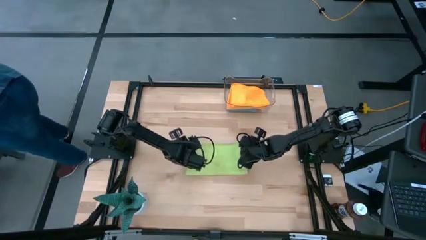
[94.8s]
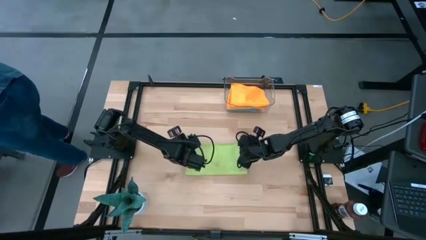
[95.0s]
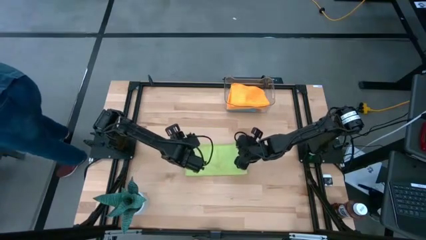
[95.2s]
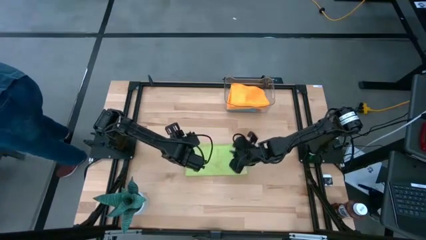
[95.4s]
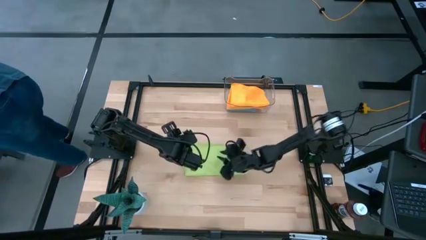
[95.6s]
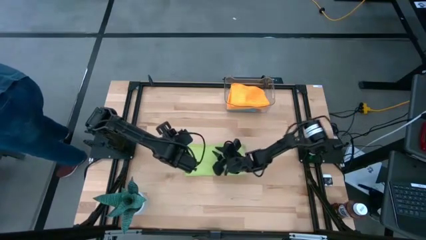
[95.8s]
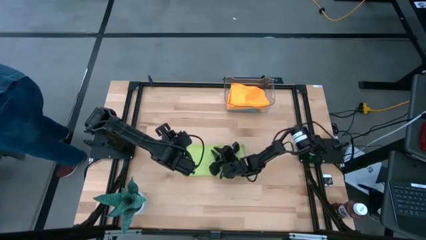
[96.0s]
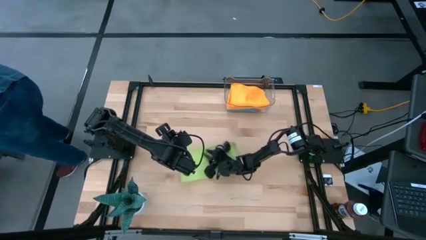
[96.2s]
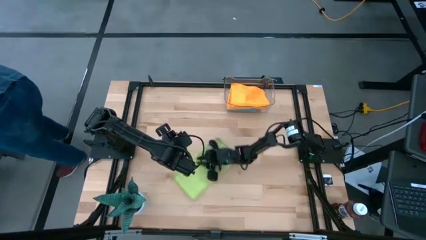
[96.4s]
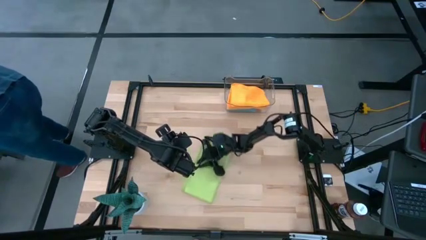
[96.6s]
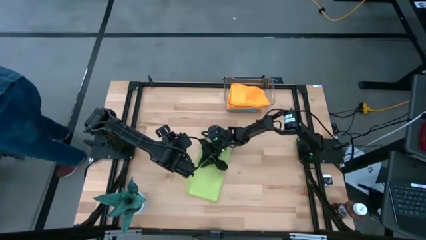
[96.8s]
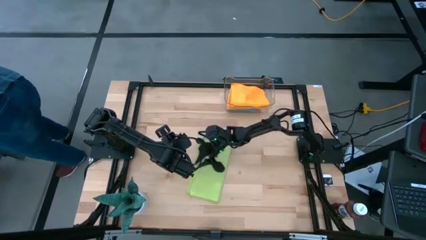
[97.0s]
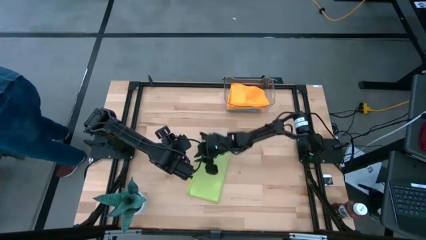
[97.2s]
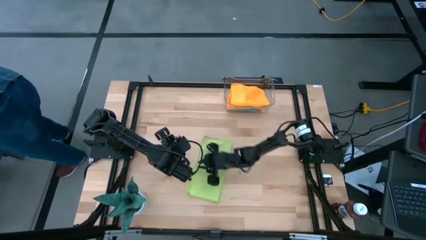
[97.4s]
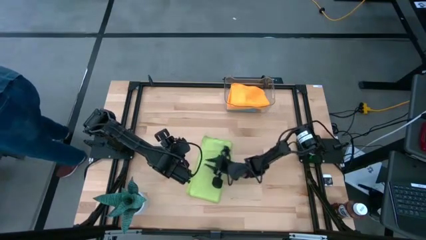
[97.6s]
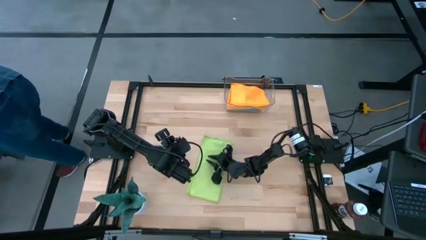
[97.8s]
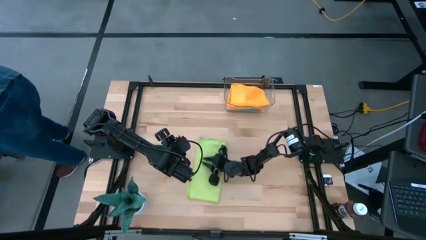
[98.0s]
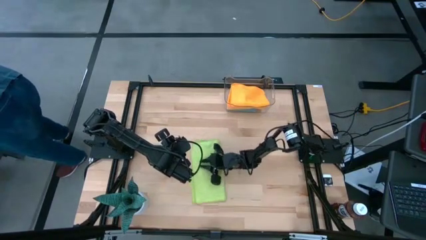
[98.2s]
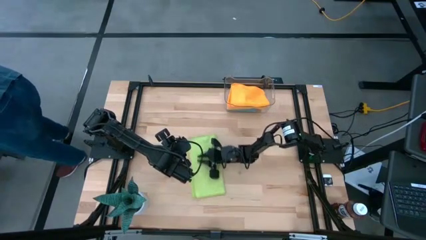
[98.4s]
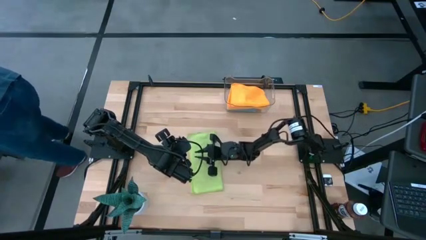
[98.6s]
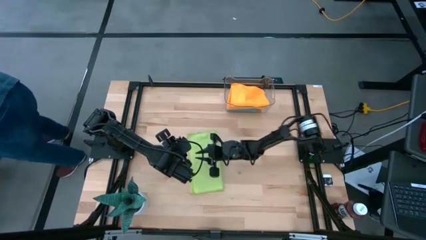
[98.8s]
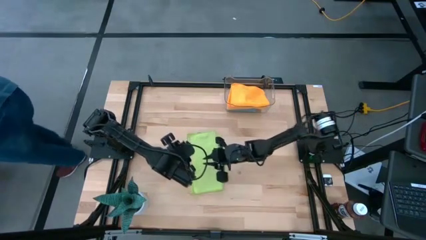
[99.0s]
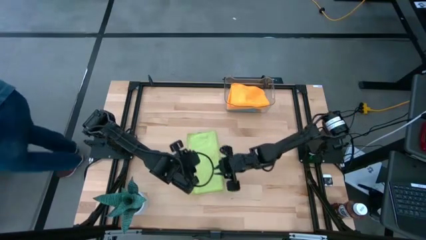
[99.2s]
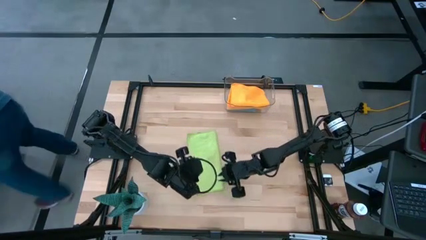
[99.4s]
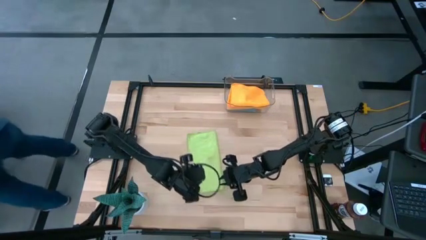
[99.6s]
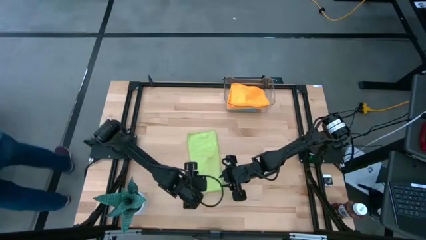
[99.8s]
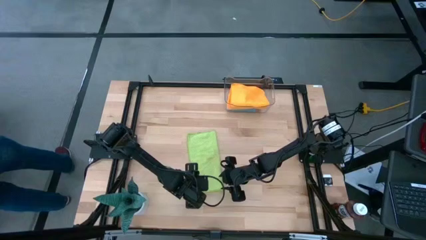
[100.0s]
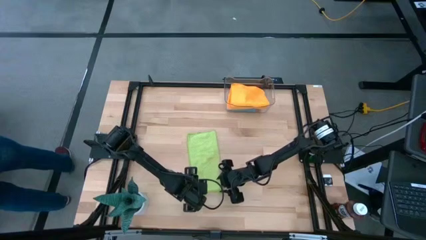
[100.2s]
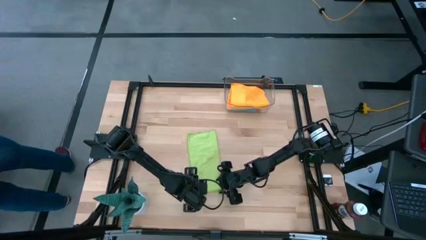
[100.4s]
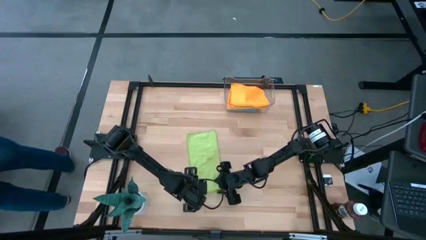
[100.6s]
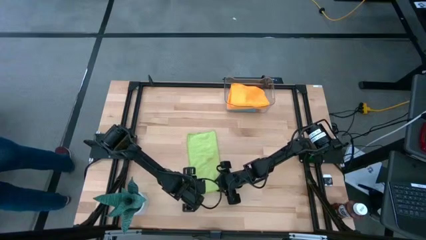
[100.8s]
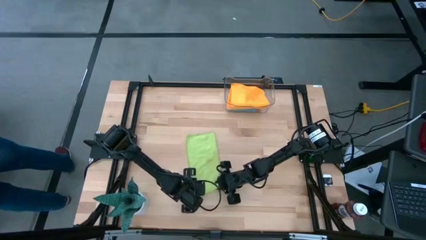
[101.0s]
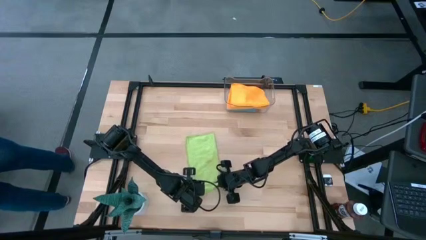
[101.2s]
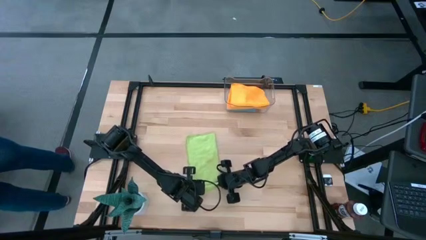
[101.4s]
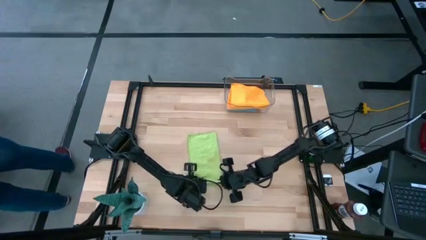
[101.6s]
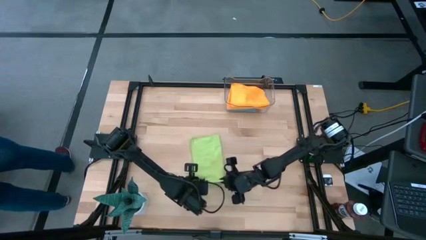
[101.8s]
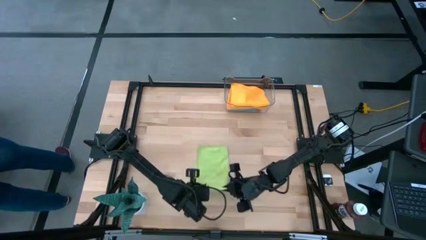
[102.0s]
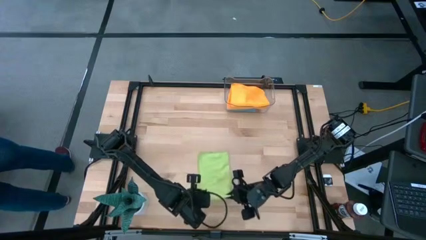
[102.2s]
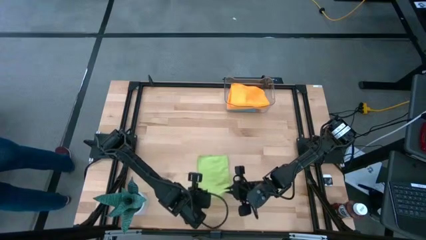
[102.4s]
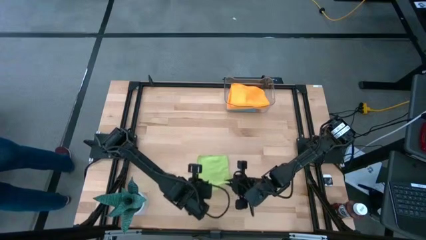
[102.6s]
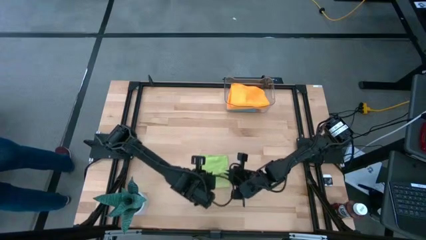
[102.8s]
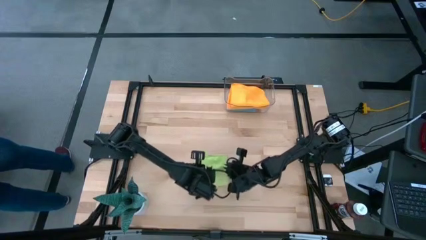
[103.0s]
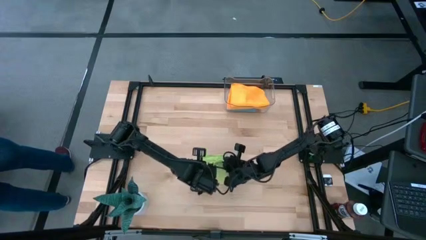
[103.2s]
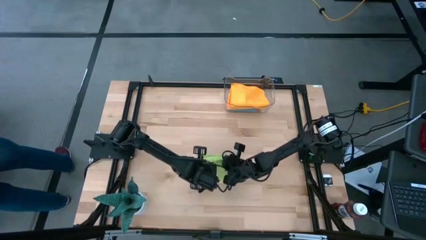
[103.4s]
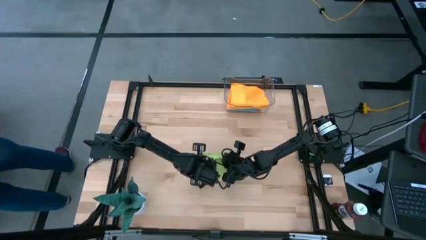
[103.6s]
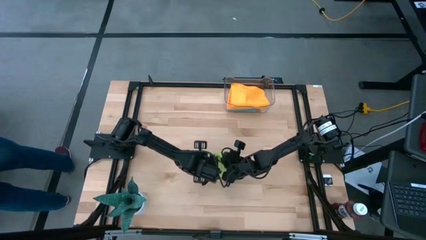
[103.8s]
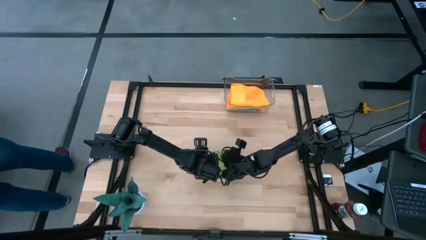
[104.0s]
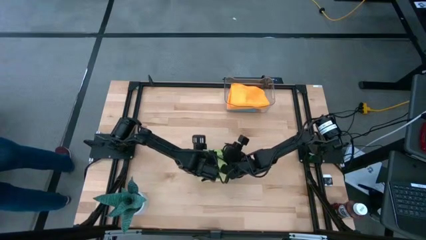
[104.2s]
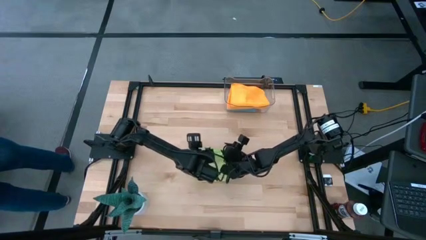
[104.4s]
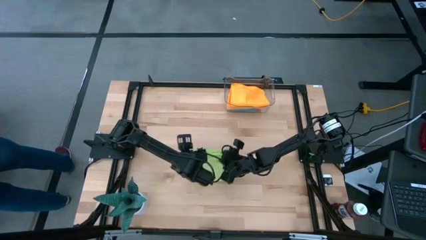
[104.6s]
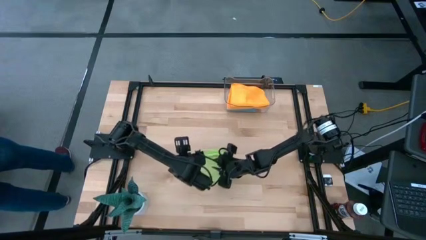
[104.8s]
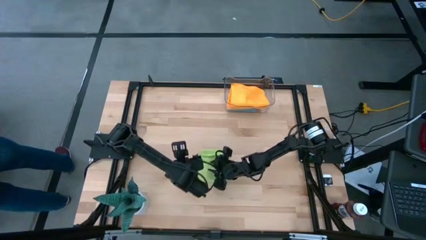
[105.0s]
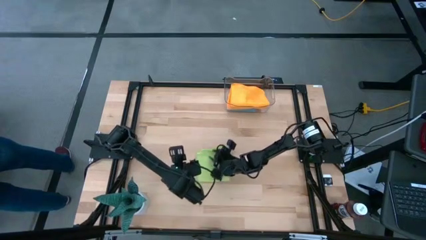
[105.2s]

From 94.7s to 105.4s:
Task: Fold microfiber towels
Fold the green microfiber cloth

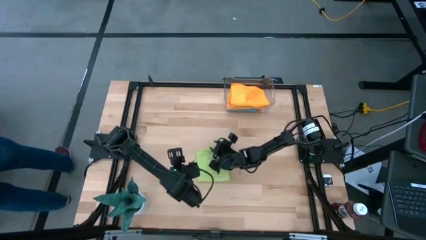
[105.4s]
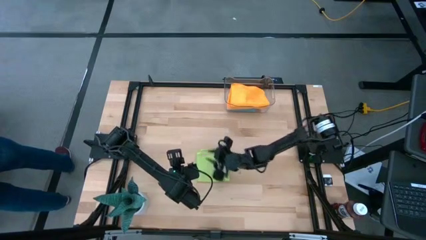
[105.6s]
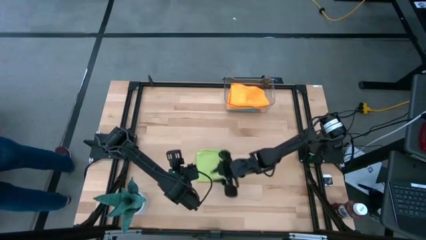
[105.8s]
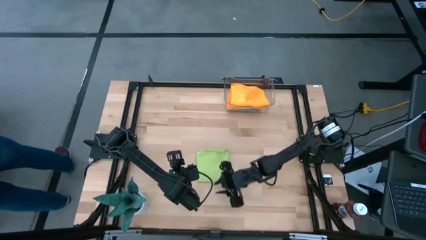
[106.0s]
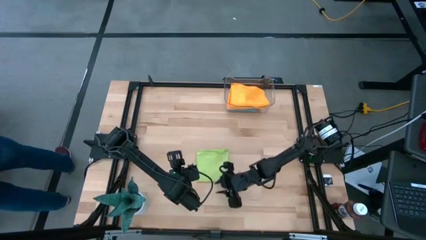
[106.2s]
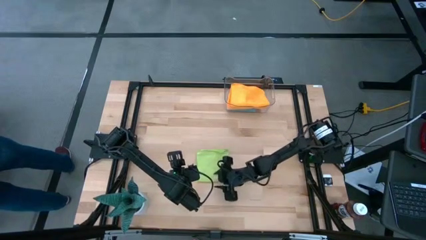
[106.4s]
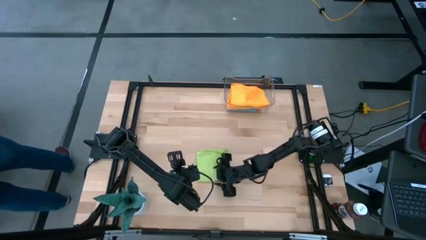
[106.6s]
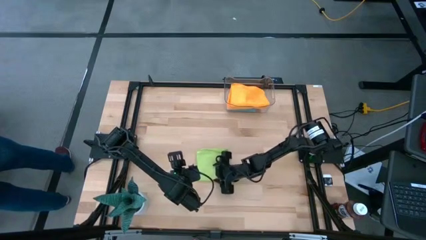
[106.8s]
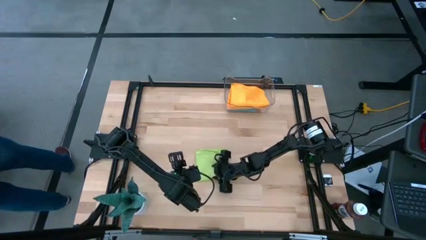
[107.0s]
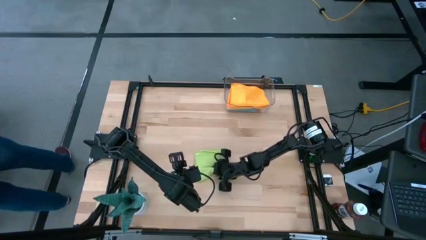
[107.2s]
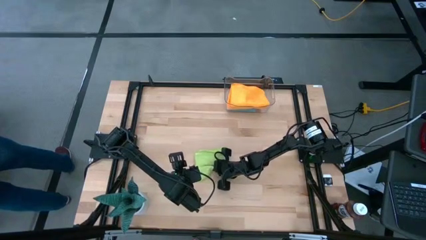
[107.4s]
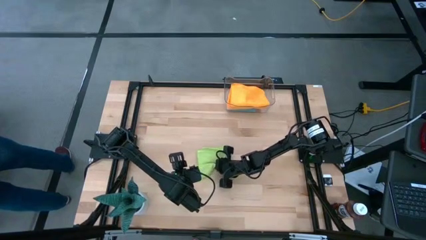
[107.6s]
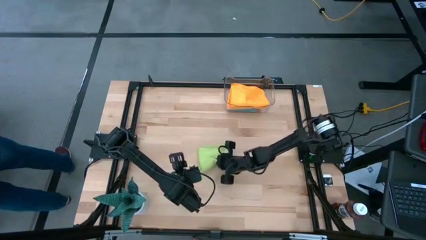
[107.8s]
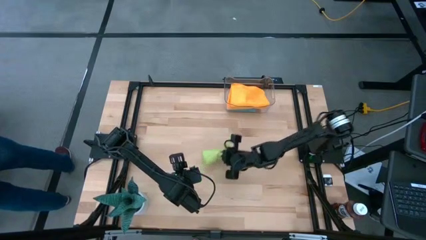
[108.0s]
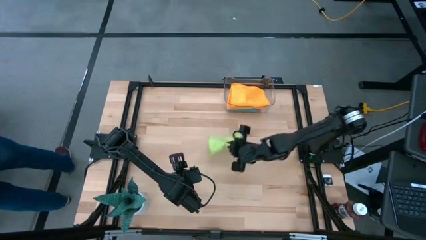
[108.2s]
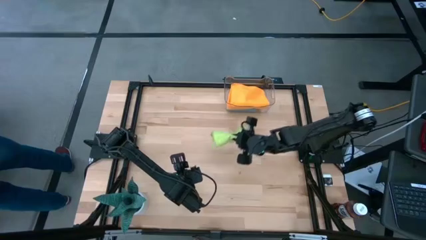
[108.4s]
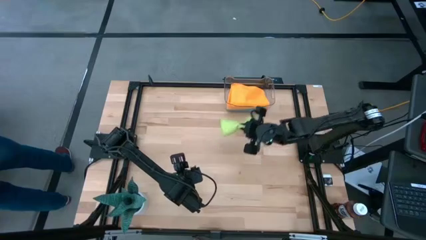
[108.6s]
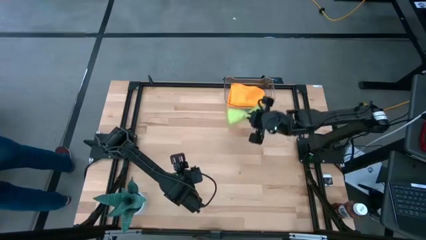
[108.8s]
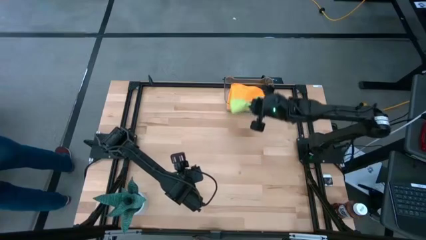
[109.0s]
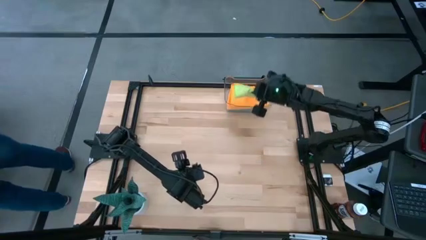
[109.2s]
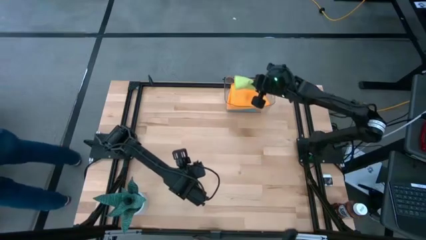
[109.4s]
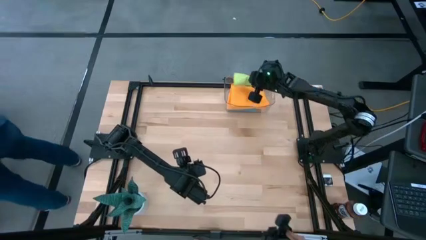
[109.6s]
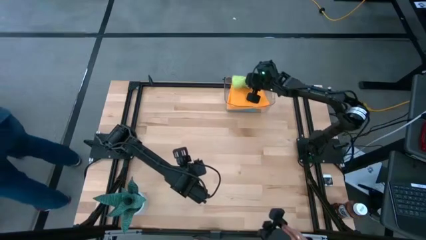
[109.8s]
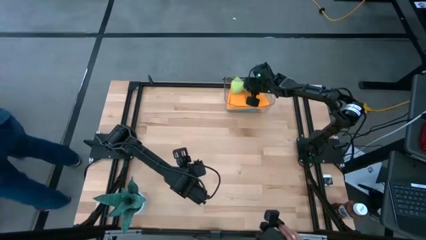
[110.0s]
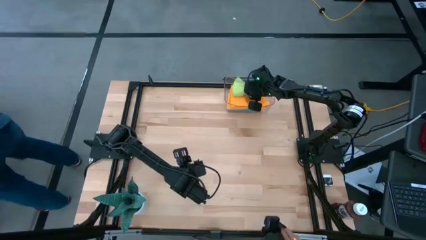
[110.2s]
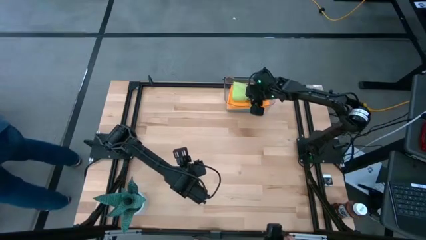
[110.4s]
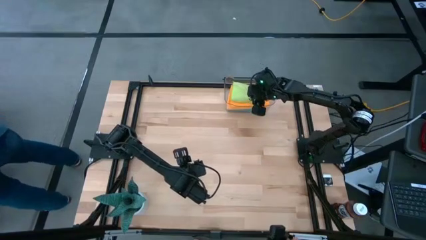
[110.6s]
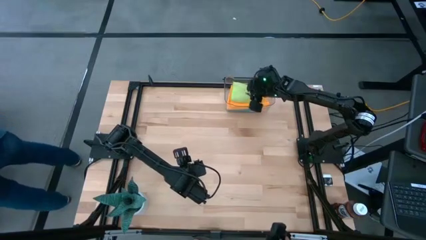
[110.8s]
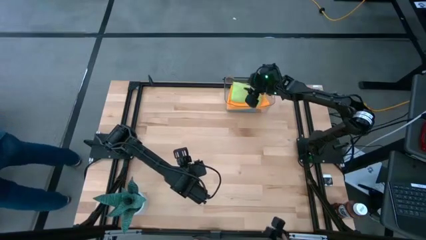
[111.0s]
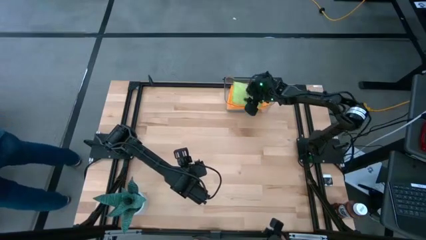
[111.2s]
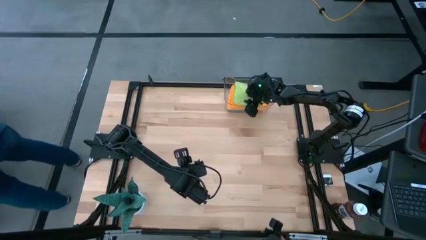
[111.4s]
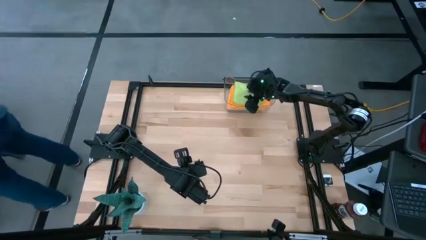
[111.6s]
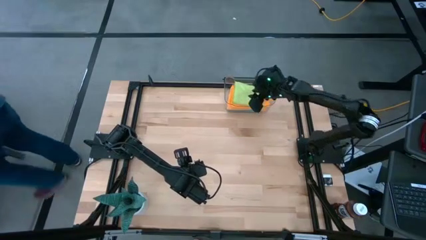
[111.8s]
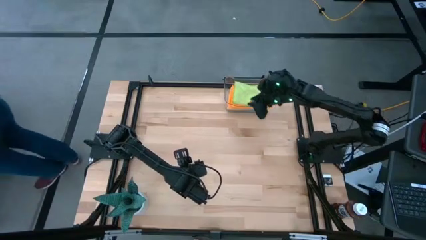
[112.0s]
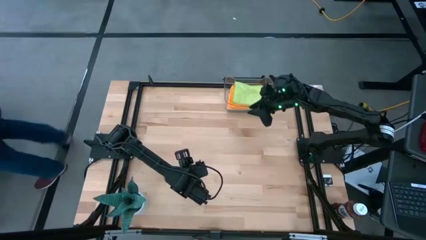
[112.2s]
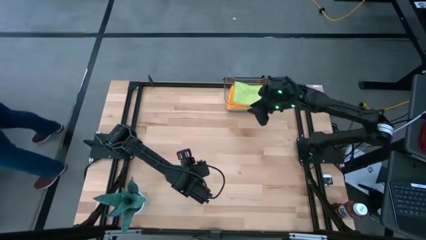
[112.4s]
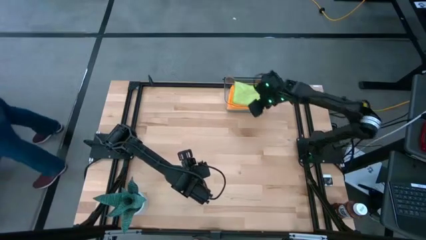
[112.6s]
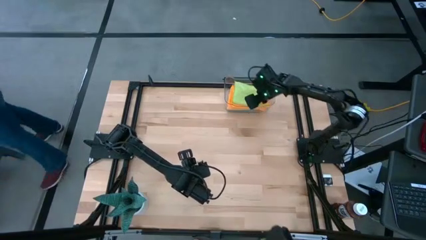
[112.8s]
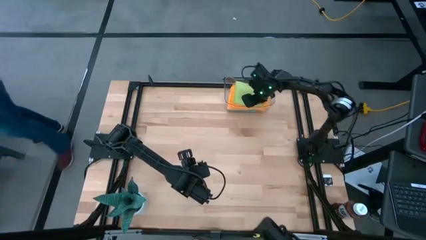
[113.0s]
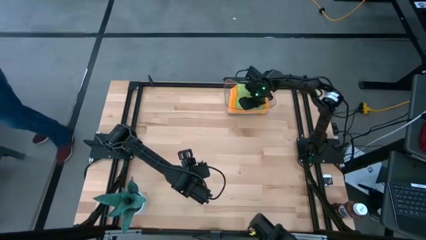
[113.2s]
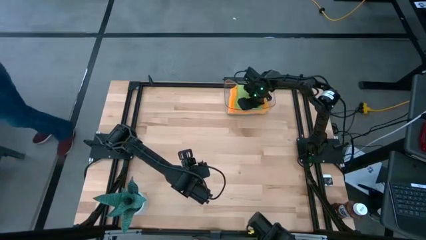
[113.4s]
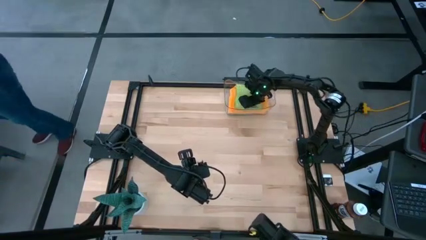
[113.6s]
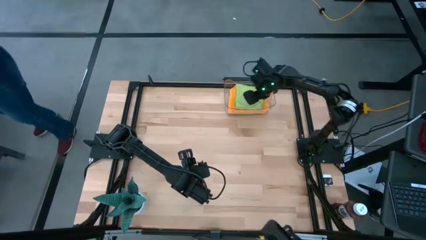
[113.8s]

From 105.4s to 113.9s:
Put the folded green microfiber cloth into the transparent bin
